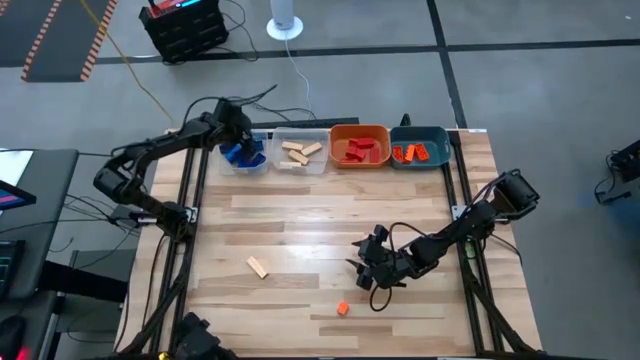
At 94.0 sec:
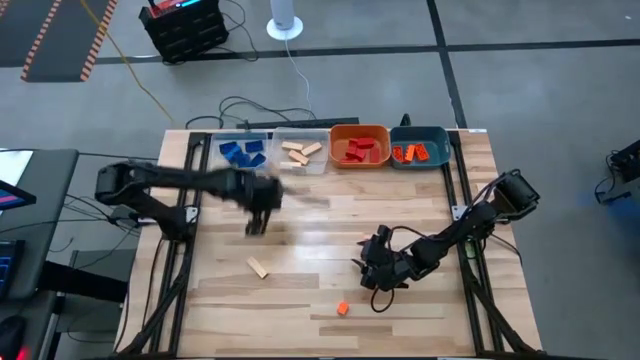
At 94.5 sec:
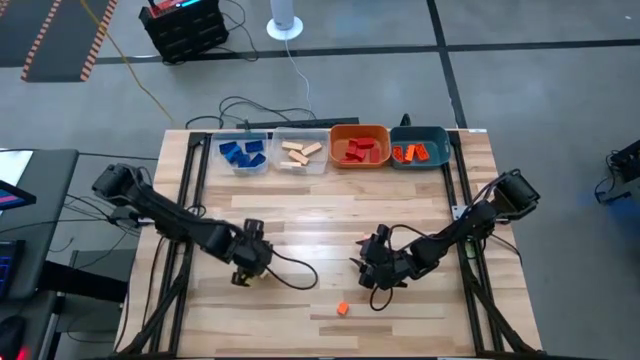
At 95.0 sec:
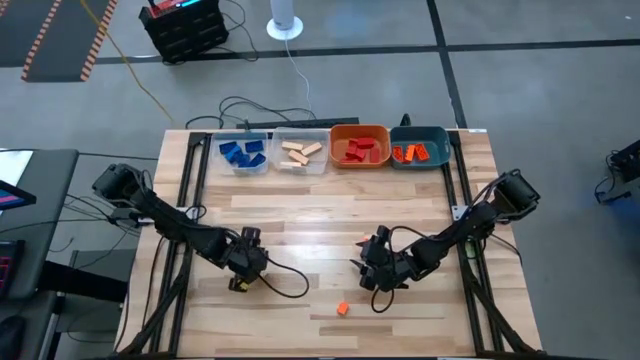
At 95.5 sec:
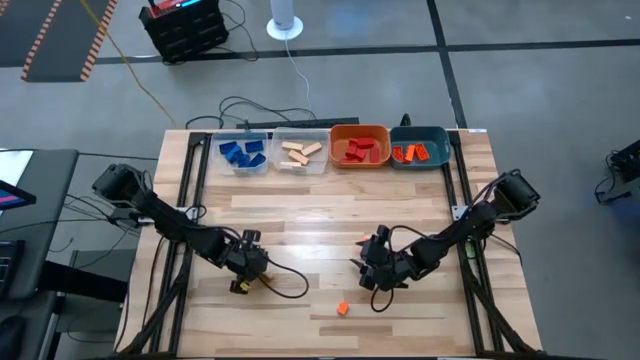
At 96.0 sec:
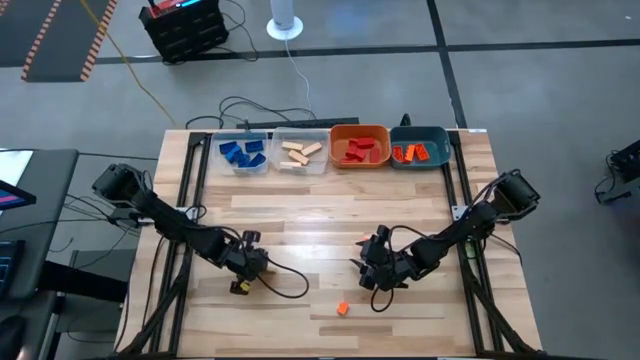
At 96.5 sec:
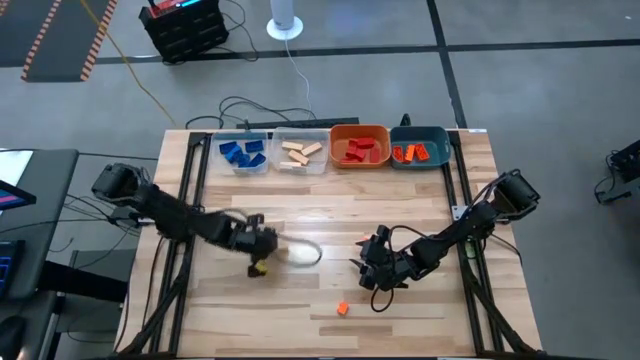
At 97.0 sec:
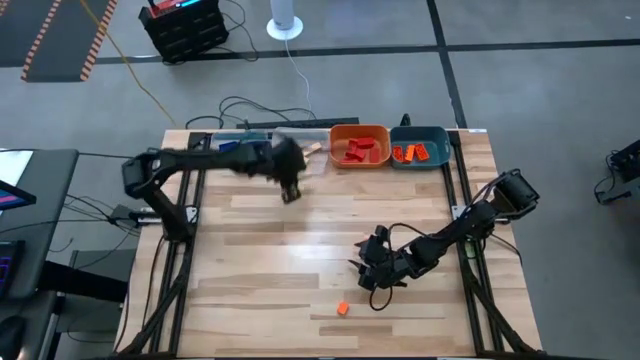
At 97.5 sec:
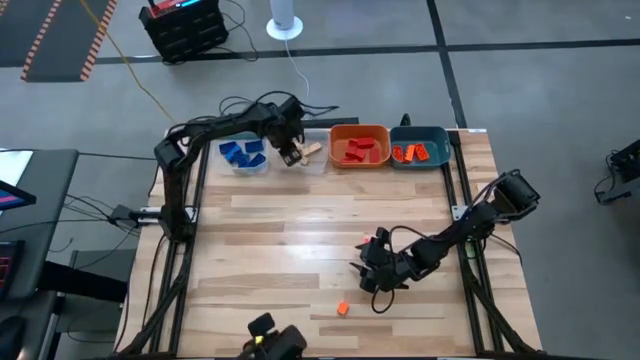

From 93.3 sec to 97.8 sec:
Task: Sort blocks
Put the brown block into the right transparent bin

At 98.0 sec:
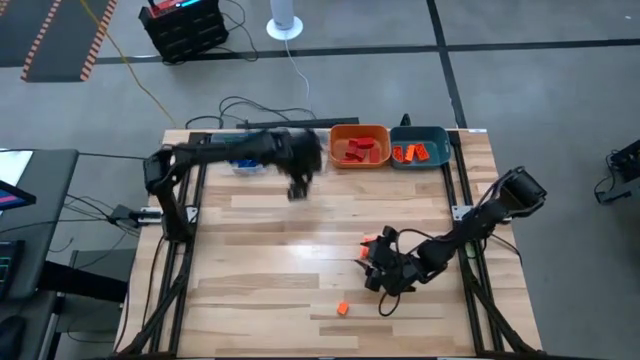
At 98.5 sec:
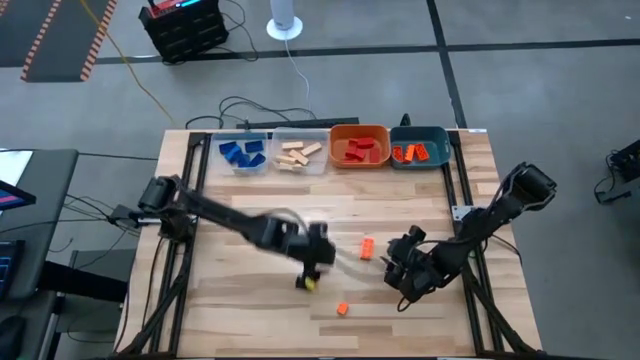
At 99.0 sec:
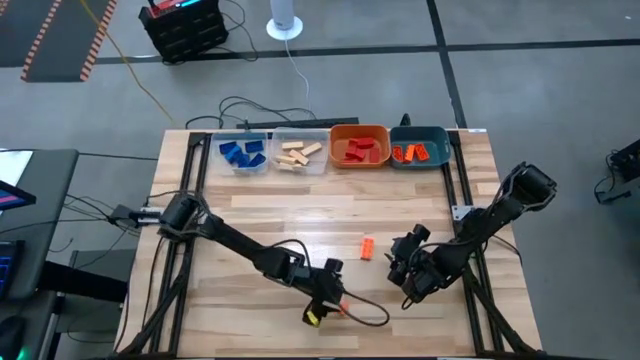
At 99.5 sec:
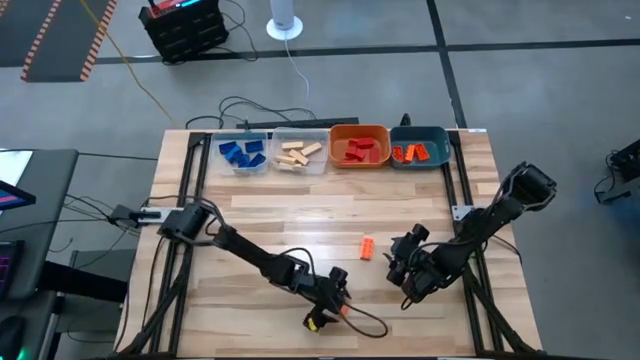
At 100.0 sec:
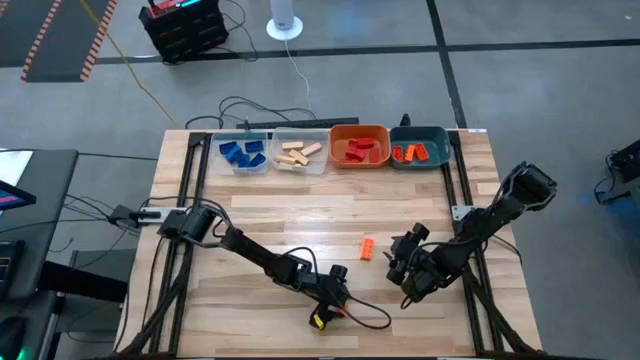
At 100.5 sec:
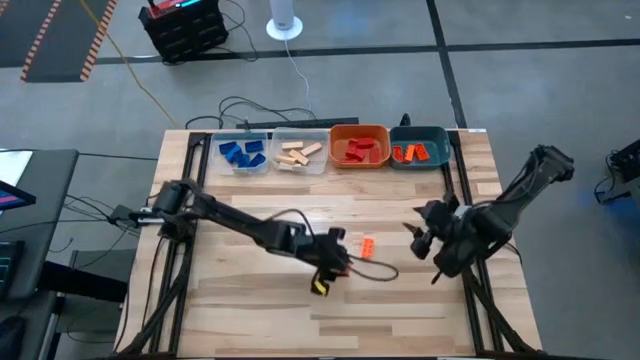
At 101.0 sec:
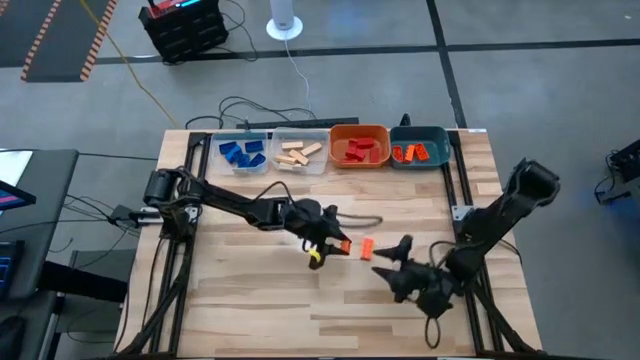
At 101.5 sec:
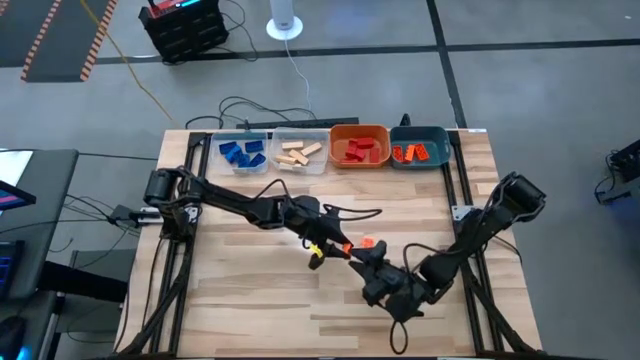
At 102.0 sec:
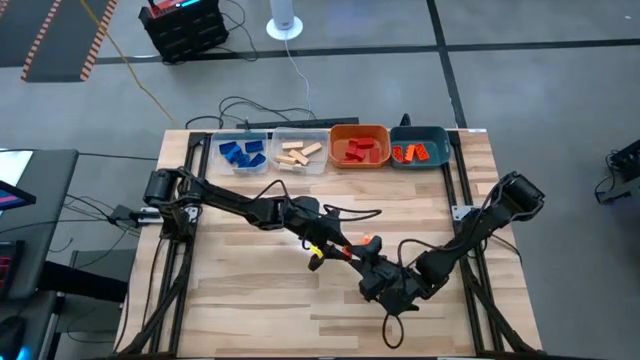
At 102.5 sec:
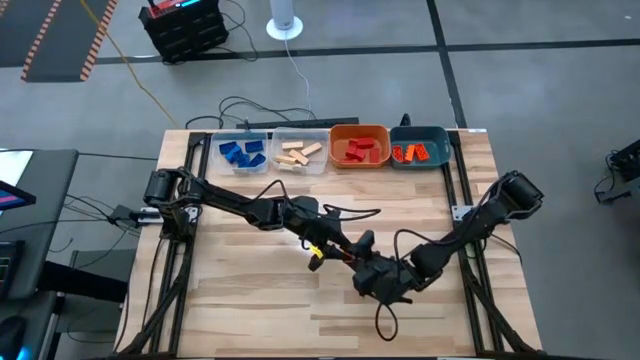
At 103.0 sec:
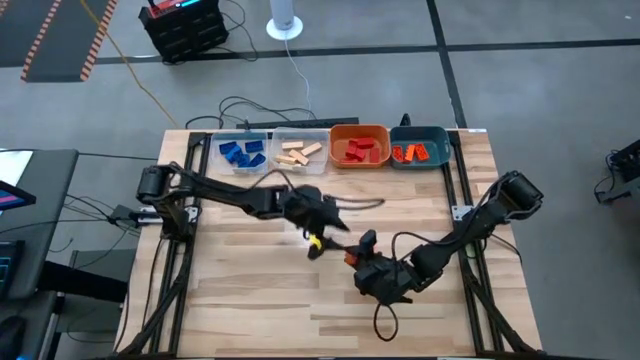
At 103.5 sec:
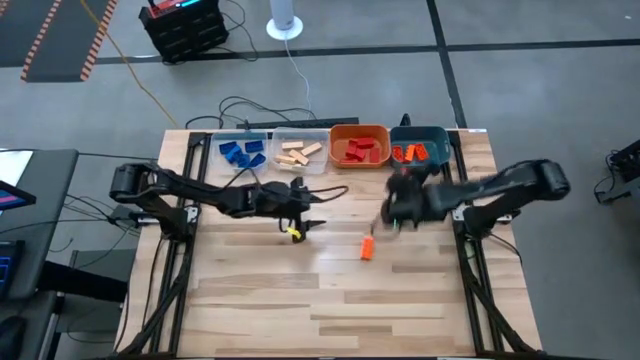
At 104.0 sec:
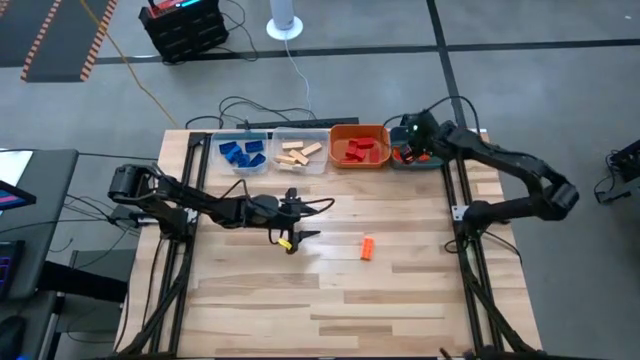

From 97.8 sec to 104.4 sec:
Put the orange game piece into the blue bin

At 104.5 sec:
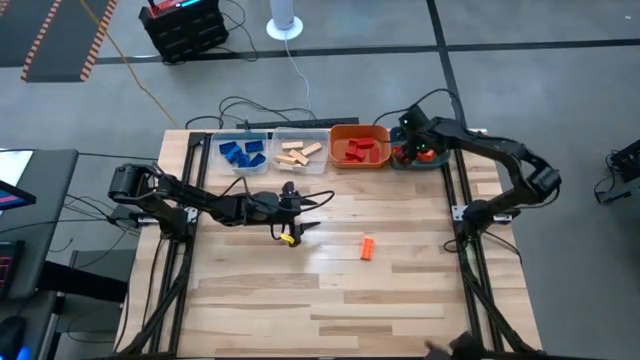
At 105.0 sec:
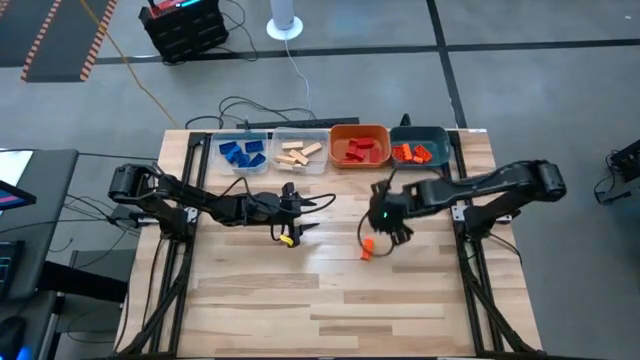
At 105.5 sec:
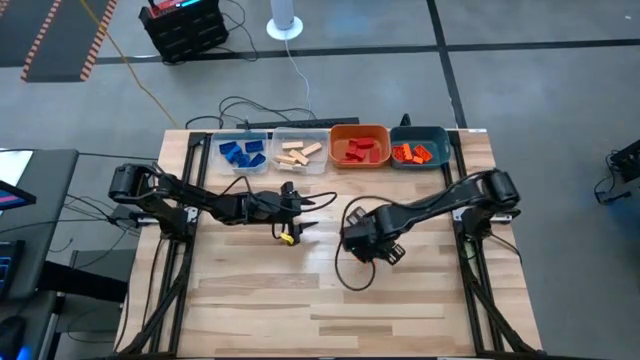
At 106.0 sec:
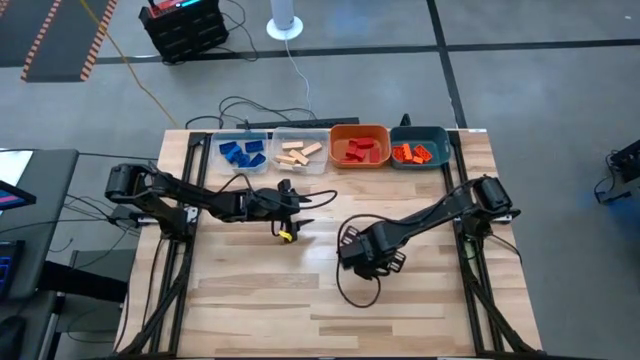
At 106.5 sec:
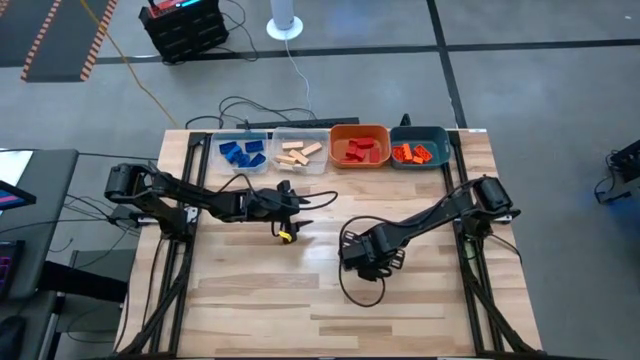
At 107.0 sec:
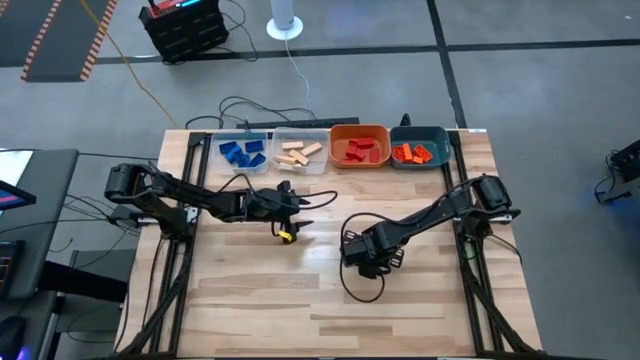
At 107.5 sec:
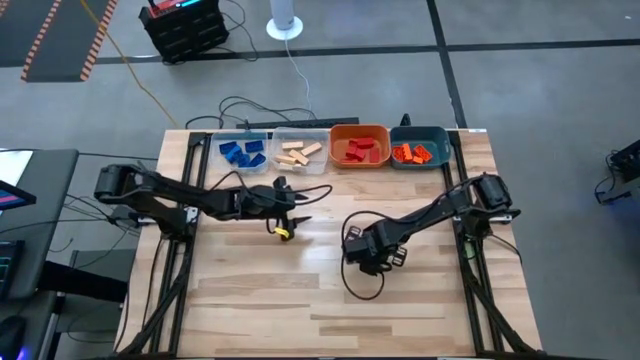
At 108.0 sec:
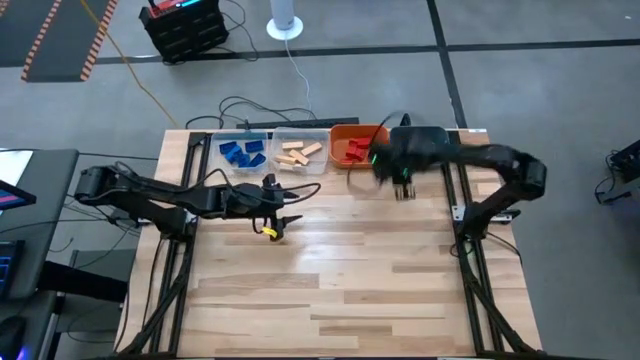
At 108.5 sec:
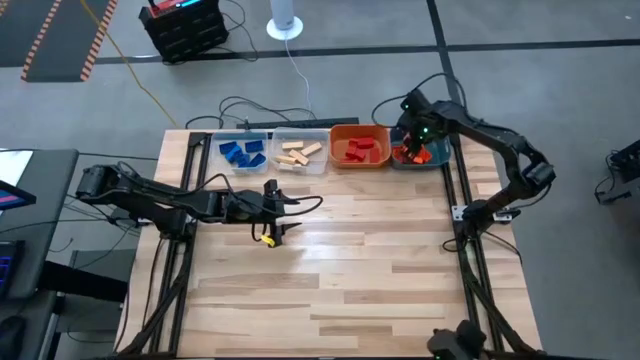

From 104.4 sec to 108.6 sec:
Put the orange game piece into the blue bin

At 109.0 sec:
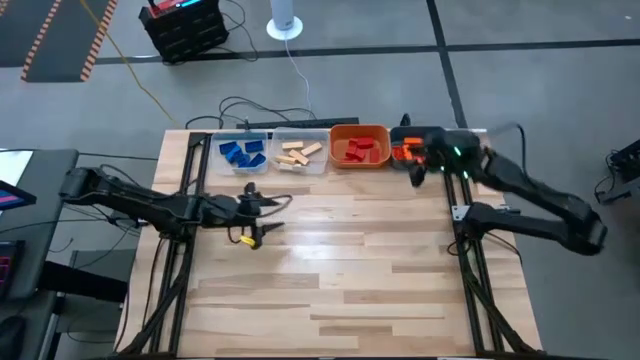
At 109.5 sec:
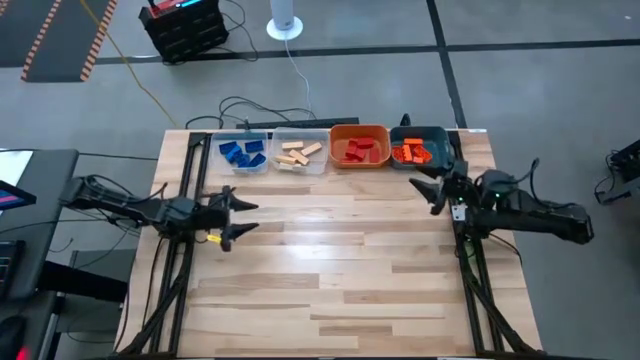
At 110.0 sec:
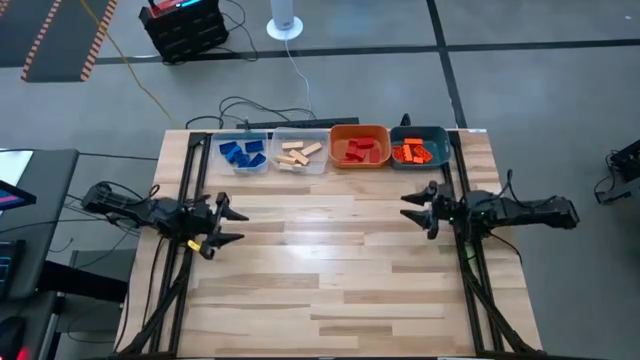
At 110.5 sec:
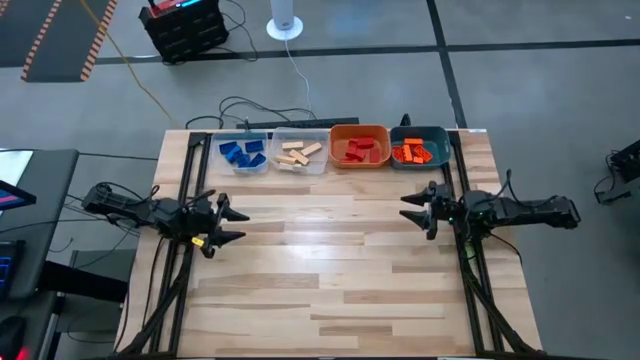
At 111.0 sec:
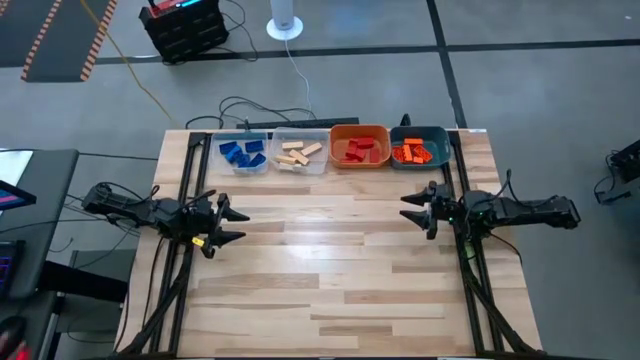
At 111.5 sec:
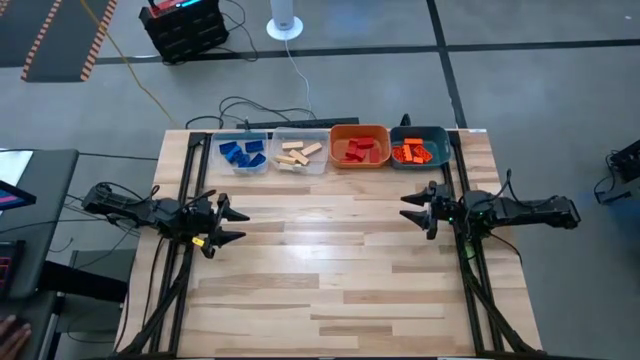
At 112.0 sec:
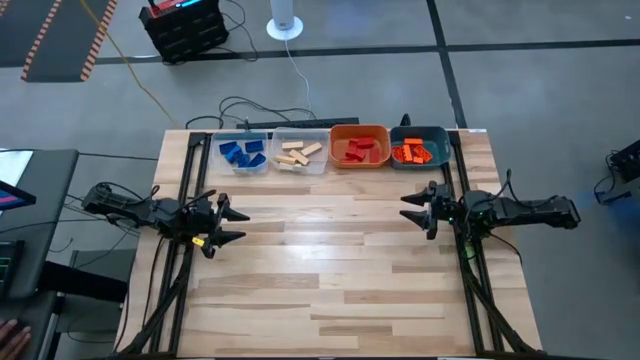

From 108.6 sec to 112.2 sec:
Return to Home Position
